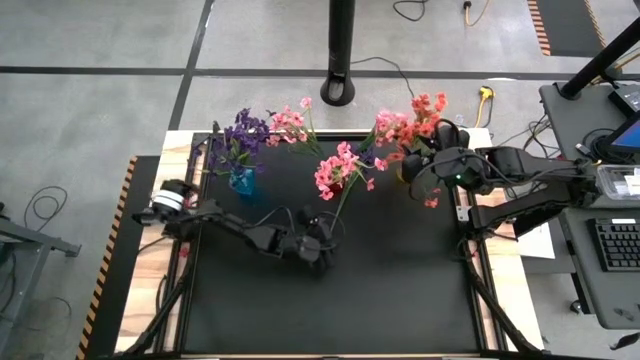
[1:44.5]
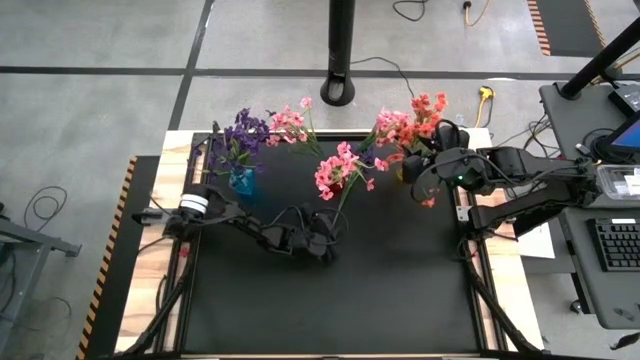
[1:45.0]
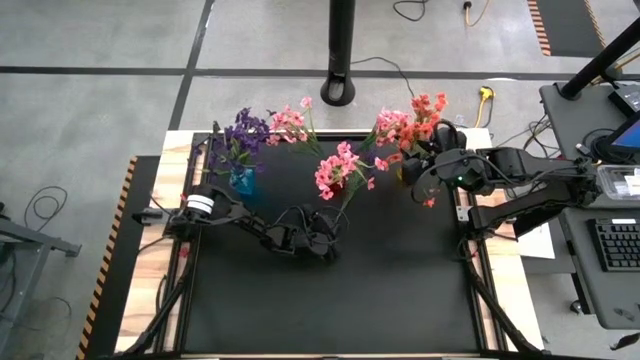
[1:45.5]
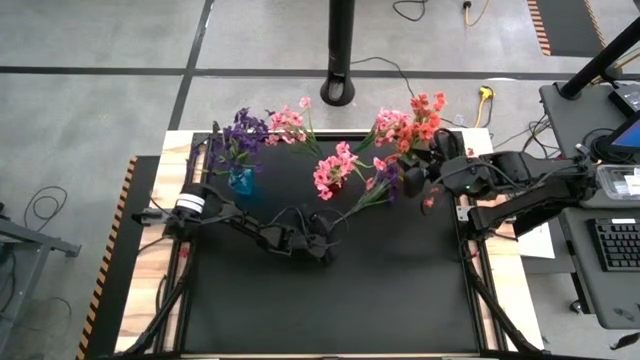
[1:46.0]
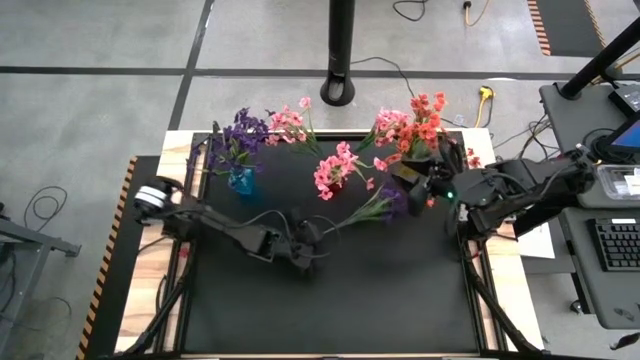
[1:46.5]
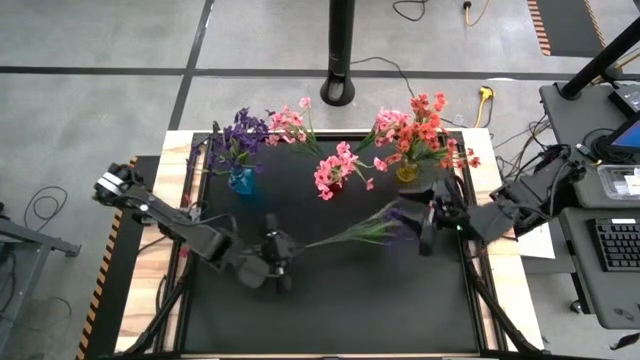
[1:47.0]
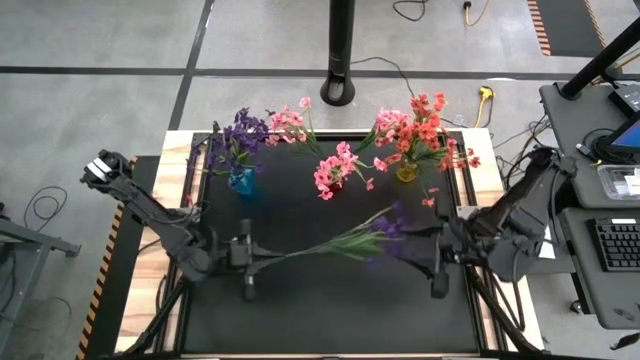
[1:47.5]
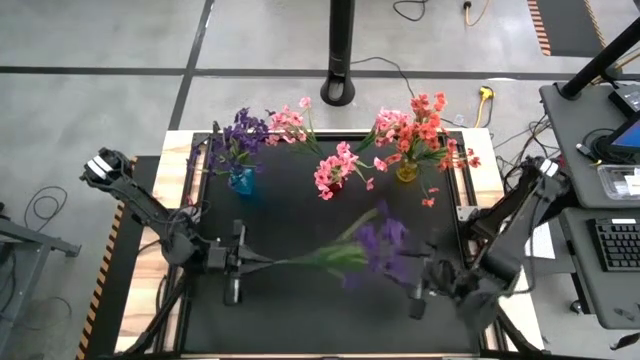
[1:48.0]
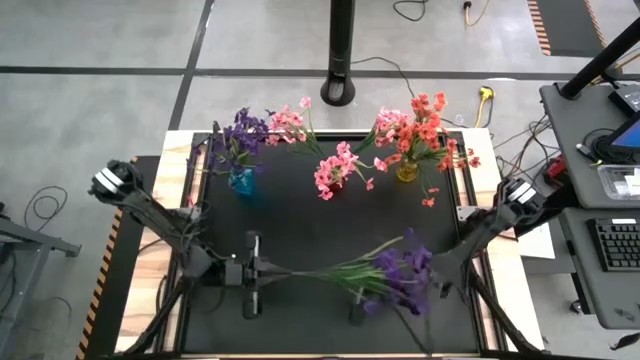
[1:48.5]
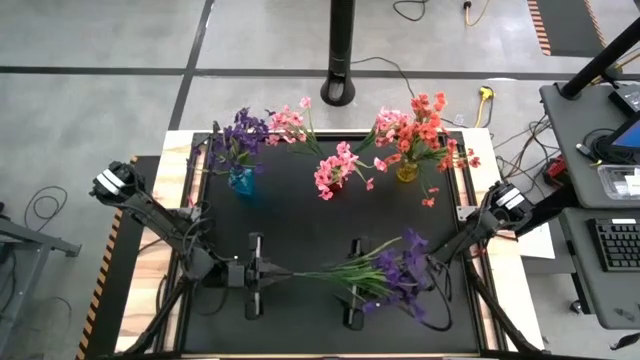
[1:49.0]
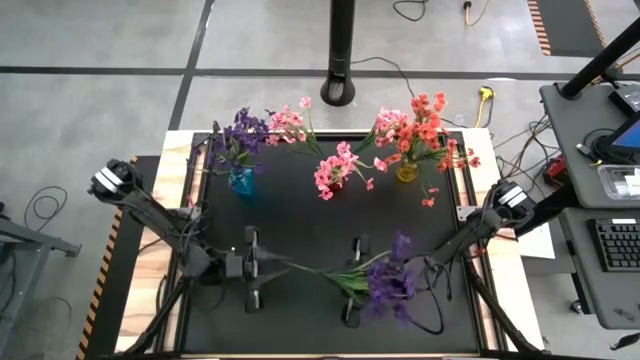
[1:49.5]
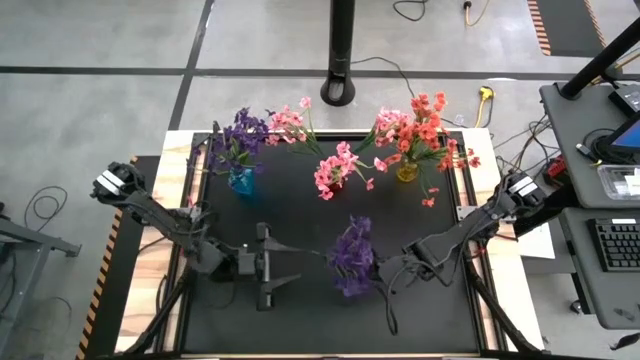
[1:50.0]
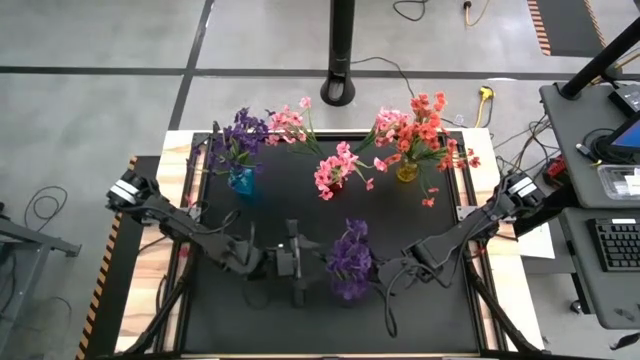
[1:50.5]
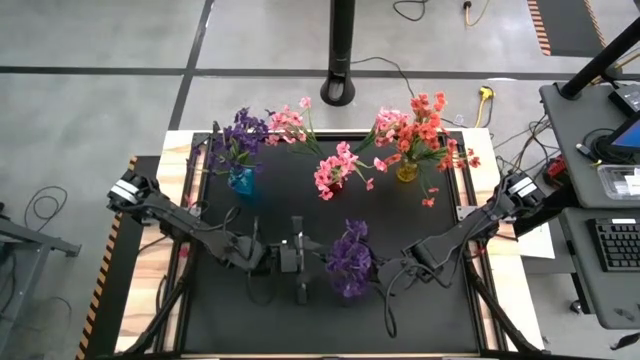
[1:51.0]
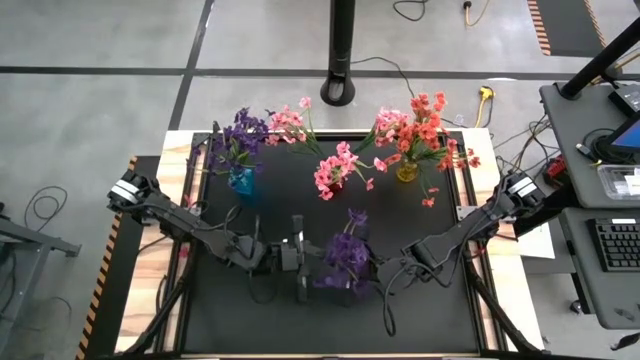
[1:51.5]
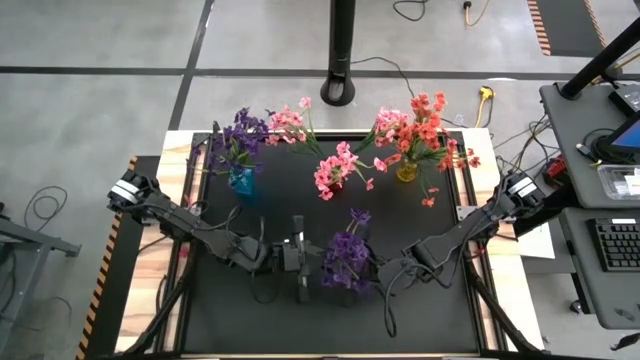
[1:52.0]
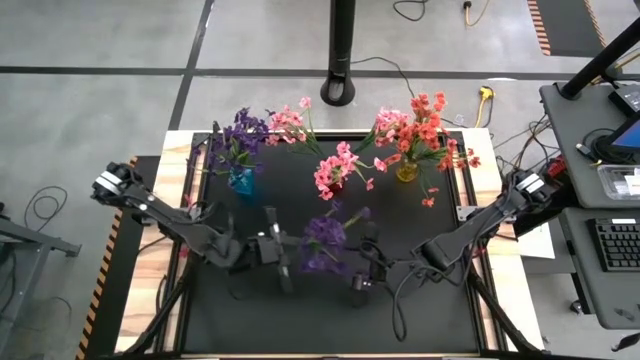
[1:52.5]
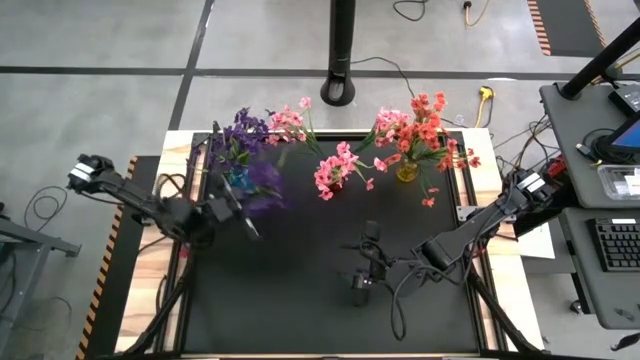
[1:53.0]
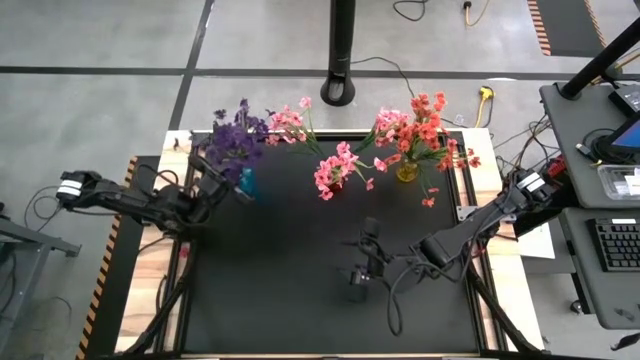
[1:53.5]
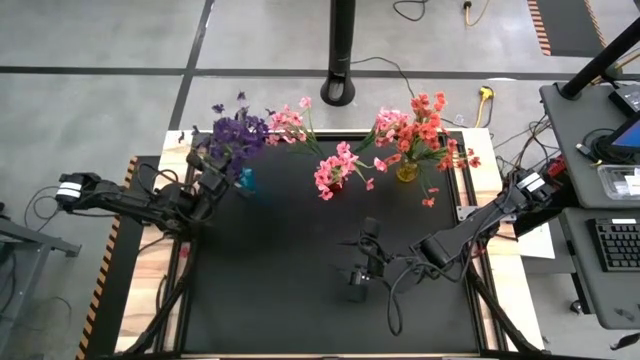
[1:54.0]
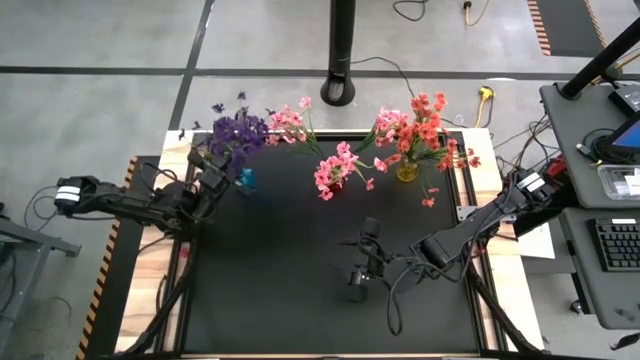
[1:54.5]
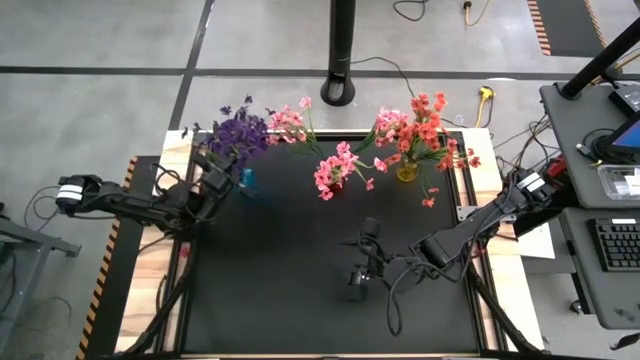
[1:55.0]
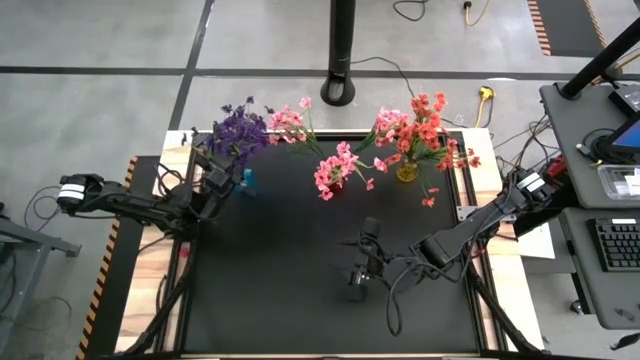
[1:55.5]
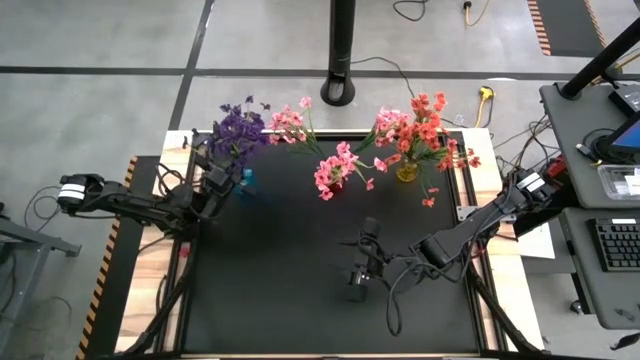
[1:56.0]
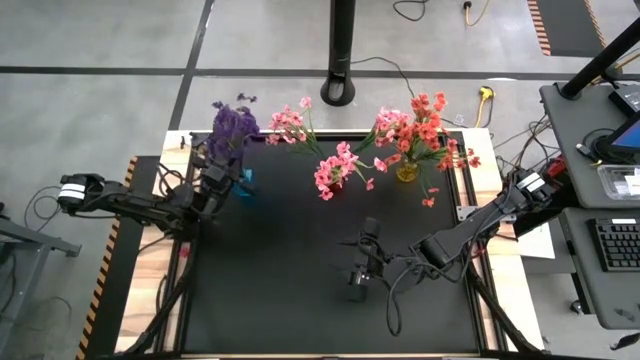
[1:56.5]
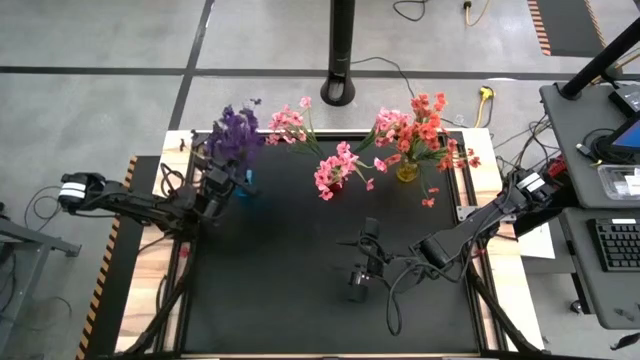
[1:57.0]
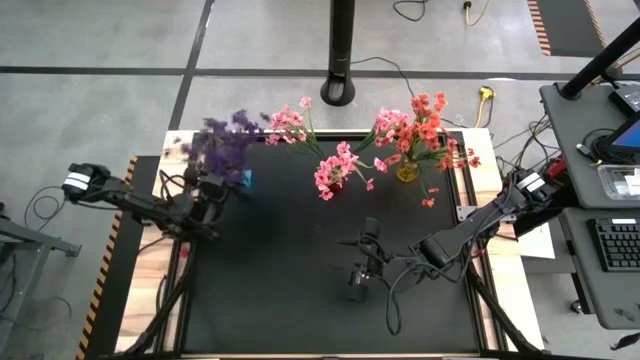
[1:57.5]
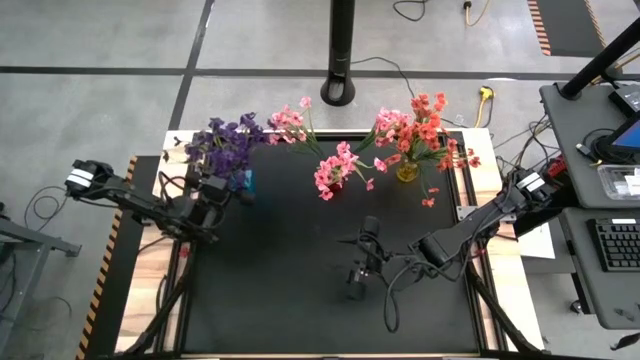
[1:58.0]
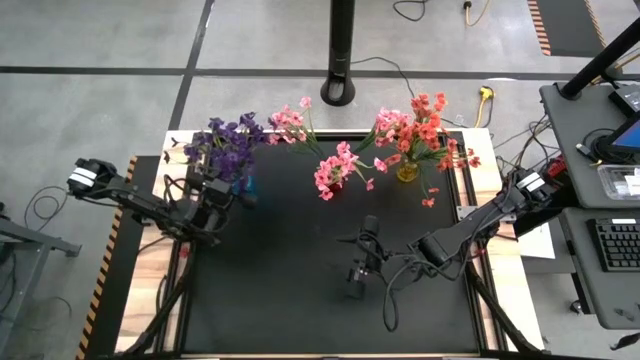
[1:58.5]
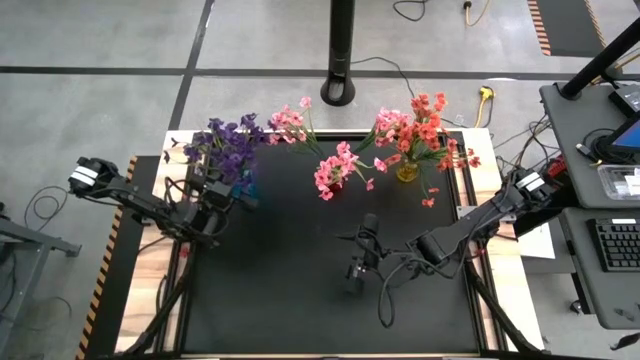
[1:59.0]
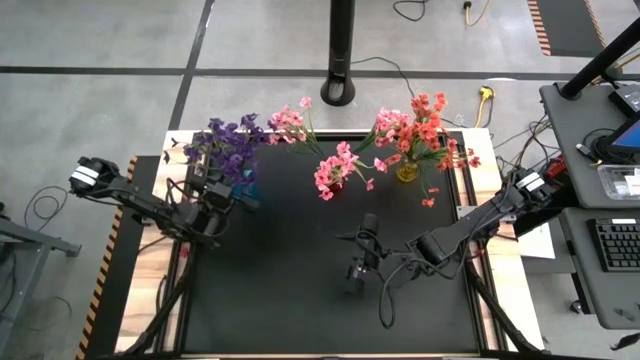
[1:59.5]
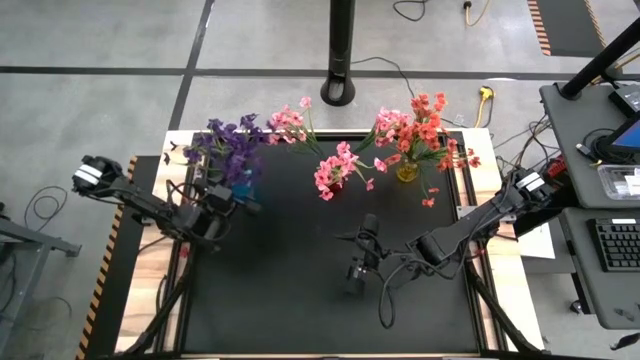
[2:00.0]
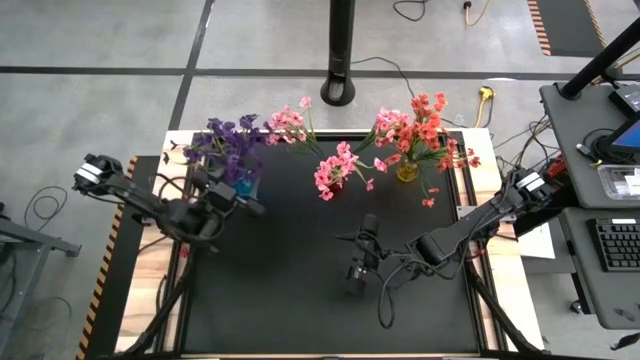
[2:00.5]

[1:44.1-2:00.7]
Task: Sort flowers into vase by color
Put the purple flower into the blue vase

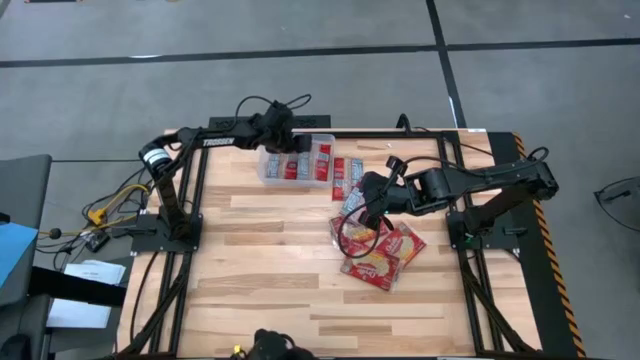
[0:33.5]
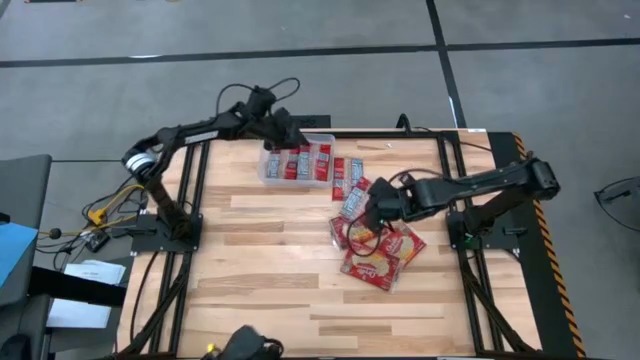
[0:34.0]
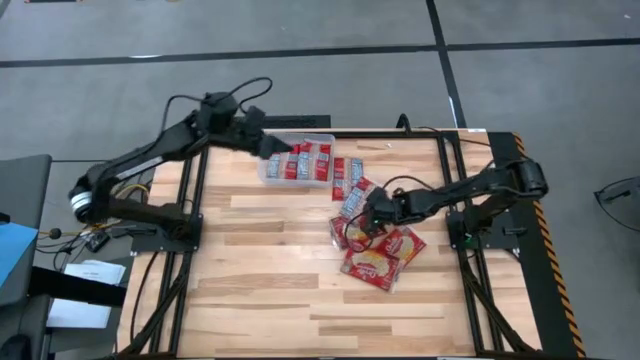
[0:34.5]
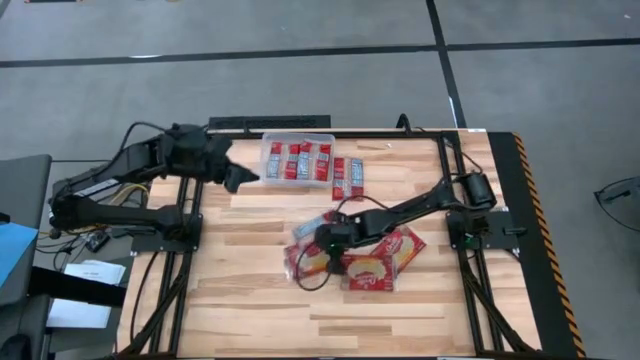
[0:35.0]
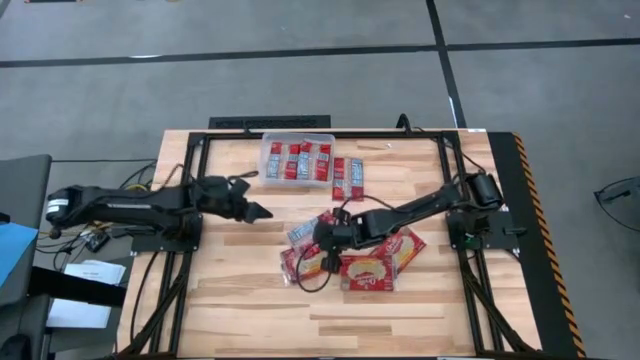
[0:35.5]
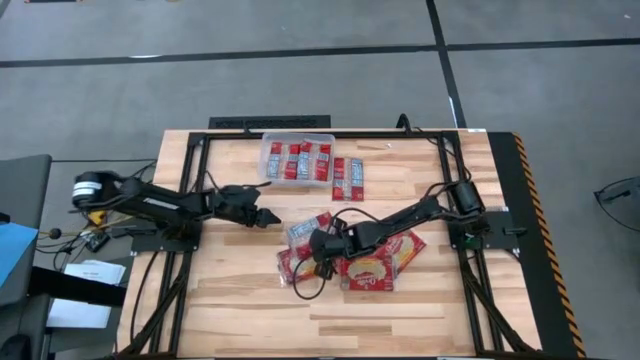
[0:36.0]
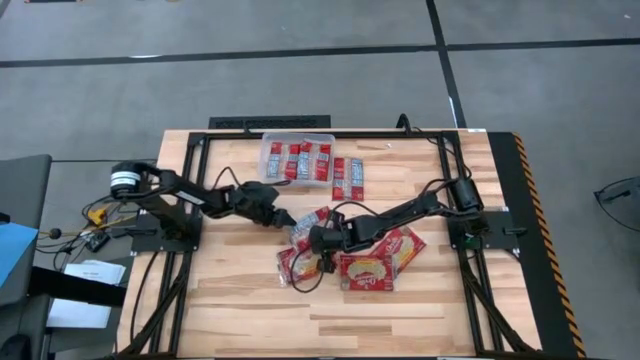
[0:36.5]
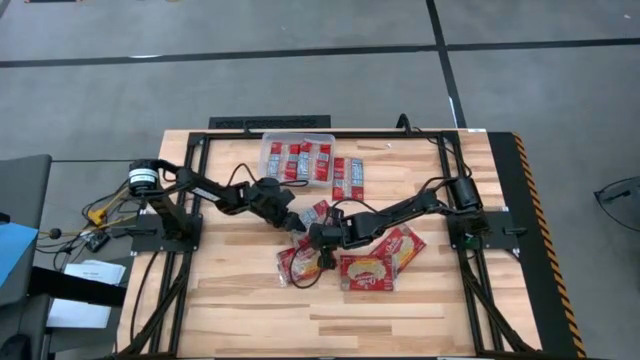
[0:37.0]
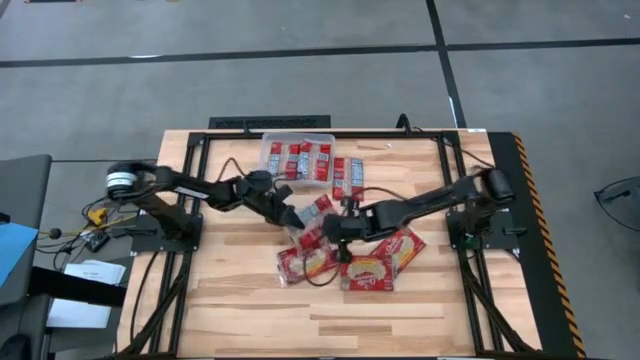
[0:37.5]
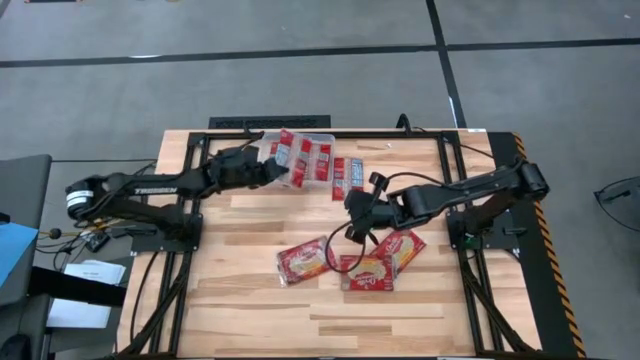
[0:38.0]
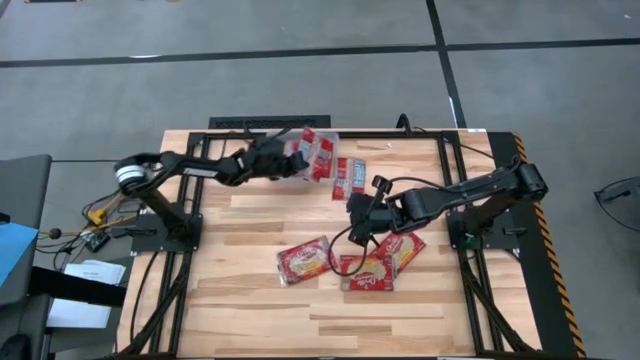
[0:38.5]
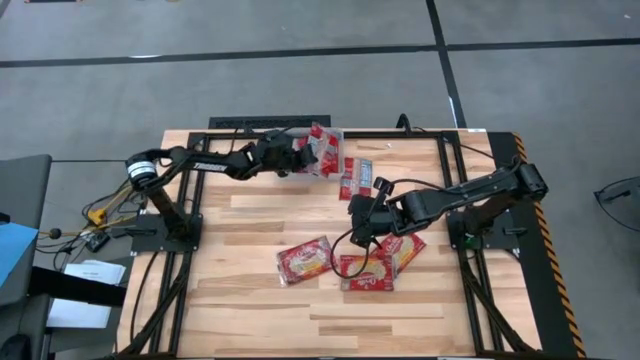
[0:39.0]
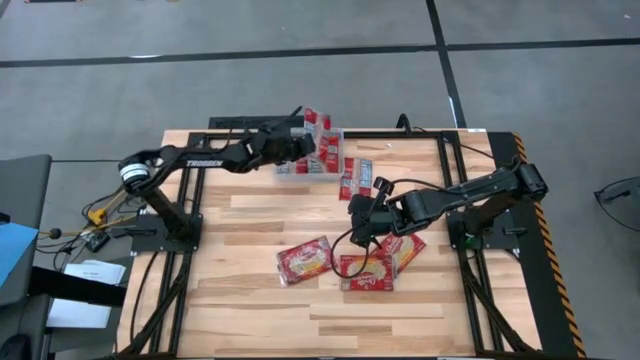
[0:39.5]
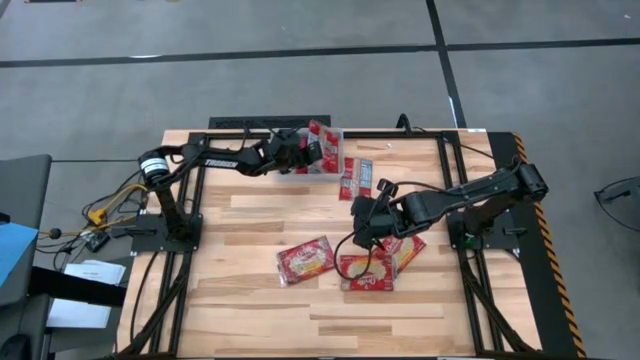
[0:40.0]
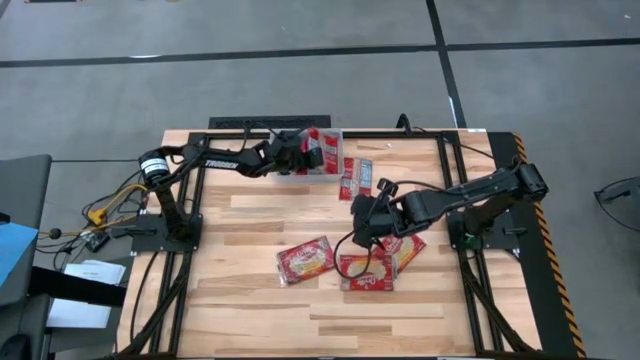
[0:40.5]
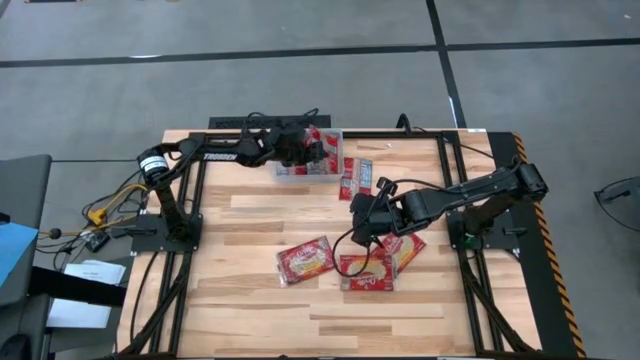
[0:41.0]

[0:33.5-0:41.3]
Task: Sort popcorn bags into baskets
Put the red popcorn bag into the transparent bin
